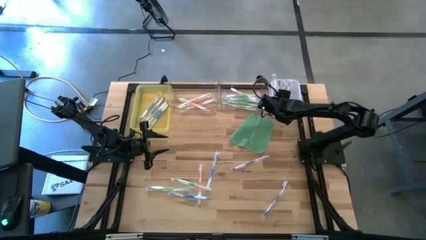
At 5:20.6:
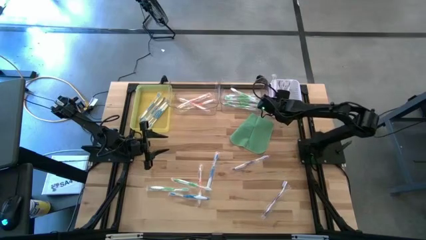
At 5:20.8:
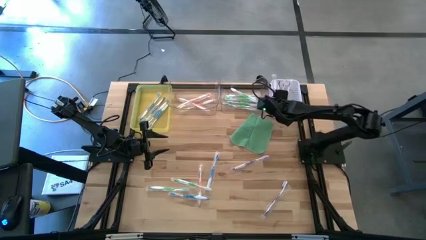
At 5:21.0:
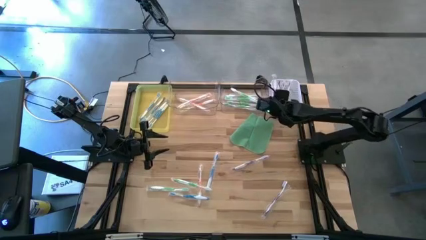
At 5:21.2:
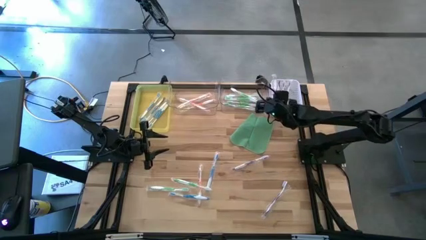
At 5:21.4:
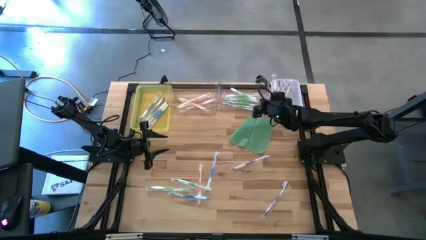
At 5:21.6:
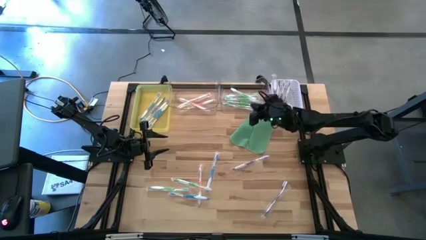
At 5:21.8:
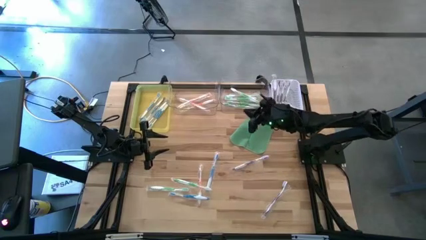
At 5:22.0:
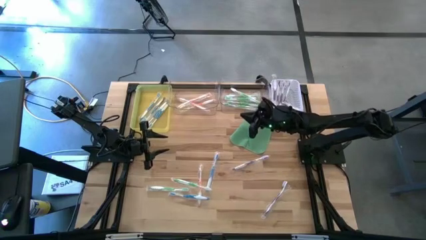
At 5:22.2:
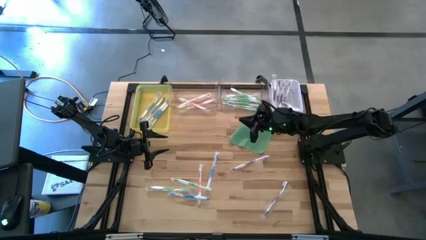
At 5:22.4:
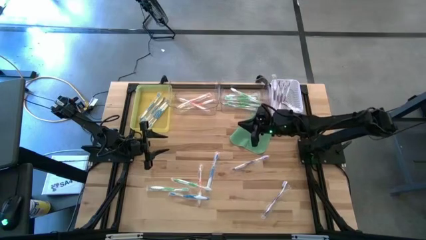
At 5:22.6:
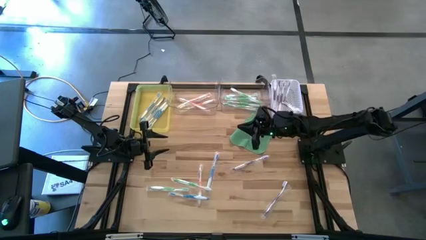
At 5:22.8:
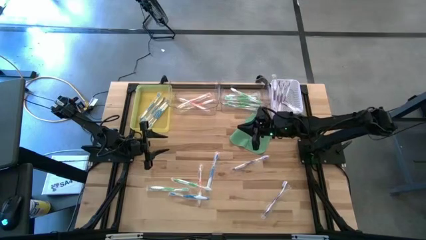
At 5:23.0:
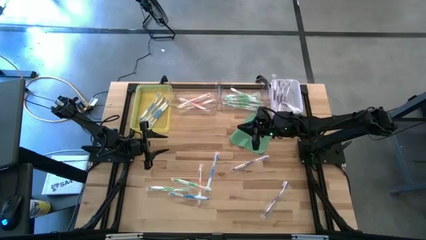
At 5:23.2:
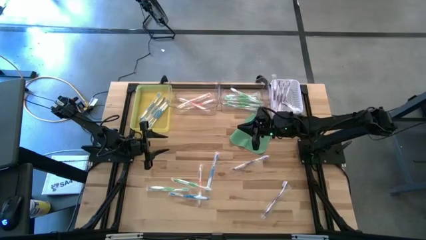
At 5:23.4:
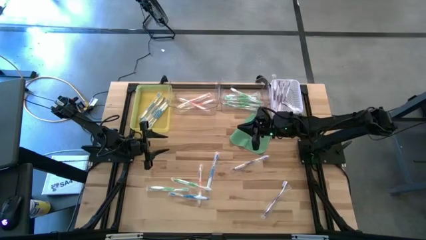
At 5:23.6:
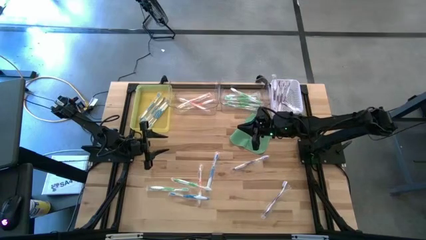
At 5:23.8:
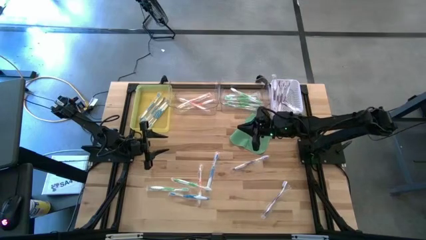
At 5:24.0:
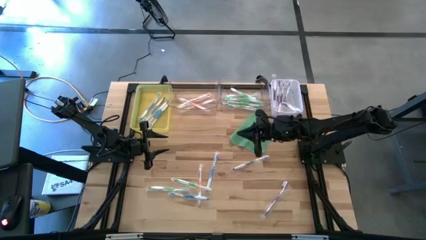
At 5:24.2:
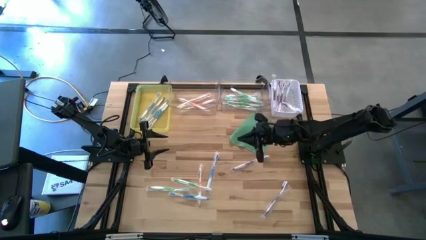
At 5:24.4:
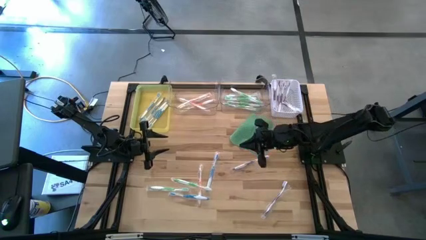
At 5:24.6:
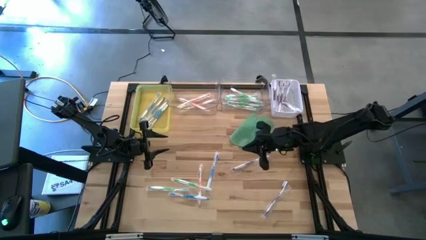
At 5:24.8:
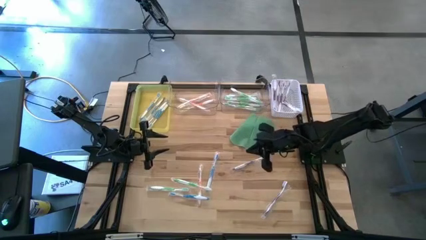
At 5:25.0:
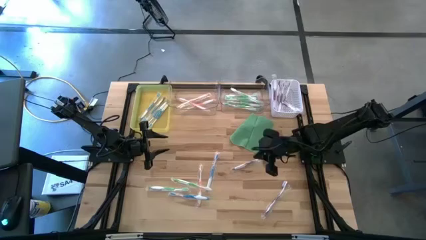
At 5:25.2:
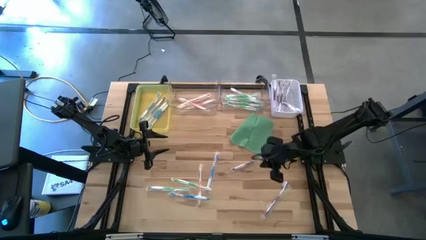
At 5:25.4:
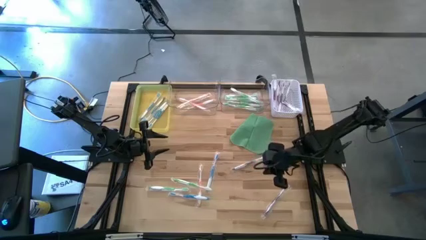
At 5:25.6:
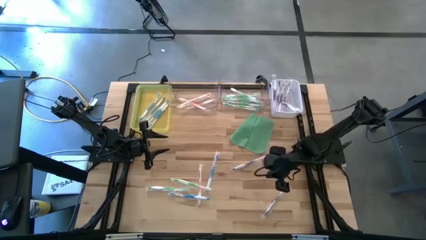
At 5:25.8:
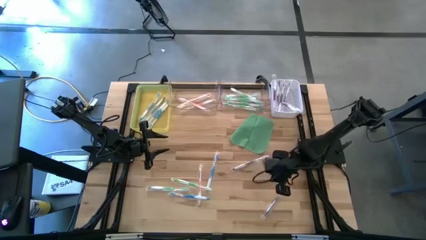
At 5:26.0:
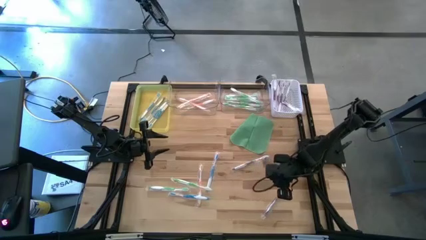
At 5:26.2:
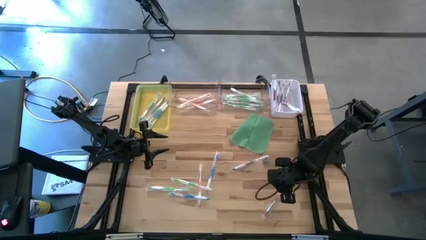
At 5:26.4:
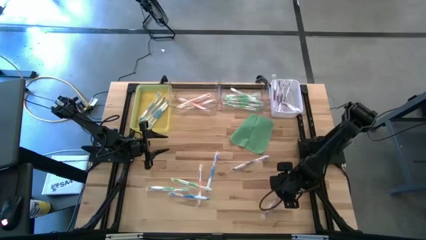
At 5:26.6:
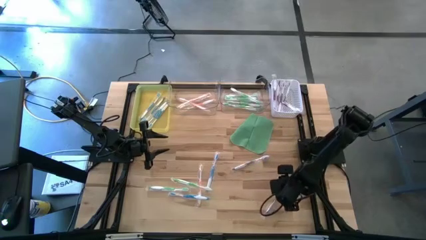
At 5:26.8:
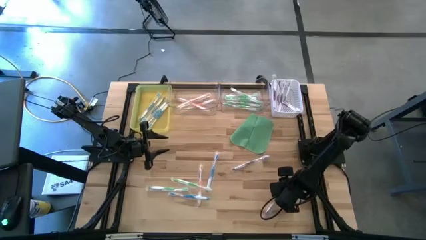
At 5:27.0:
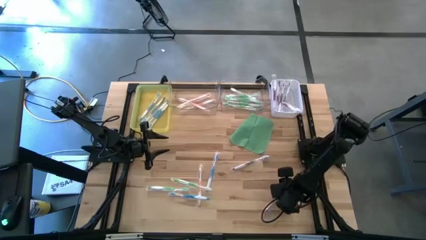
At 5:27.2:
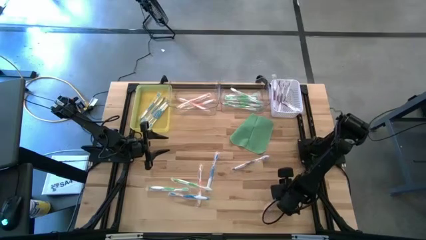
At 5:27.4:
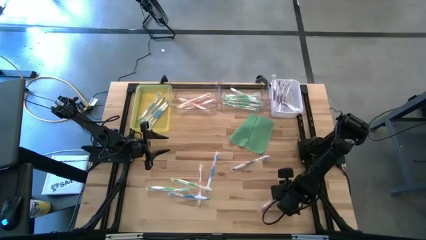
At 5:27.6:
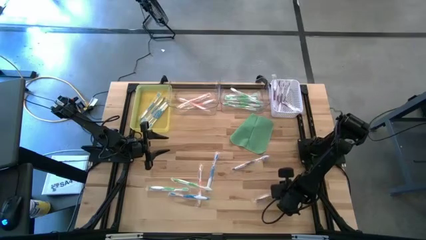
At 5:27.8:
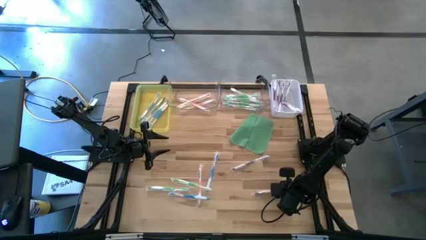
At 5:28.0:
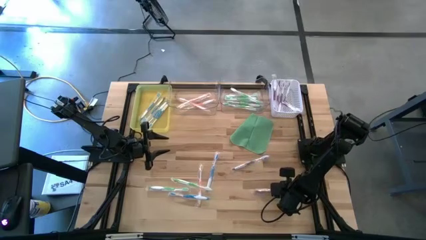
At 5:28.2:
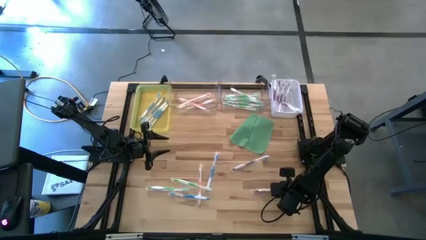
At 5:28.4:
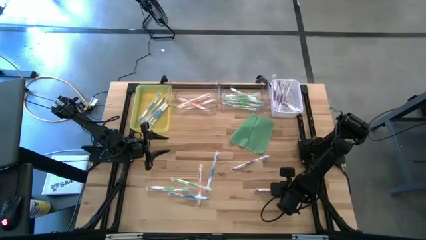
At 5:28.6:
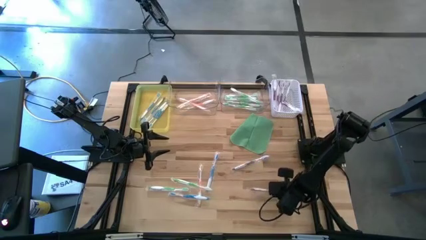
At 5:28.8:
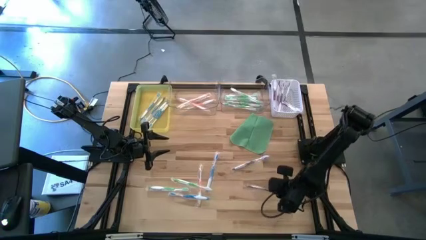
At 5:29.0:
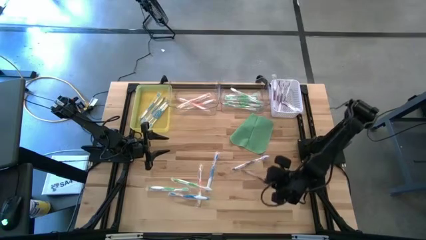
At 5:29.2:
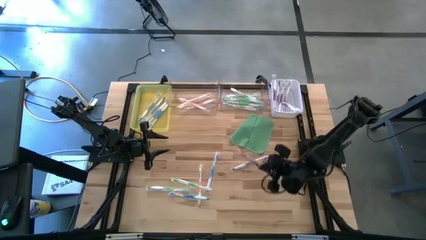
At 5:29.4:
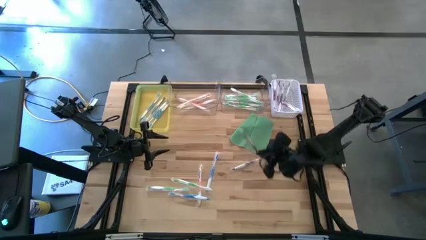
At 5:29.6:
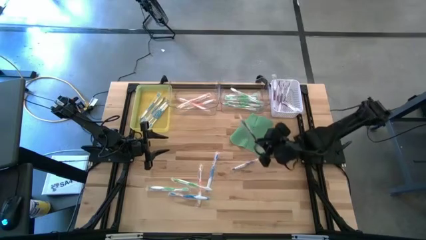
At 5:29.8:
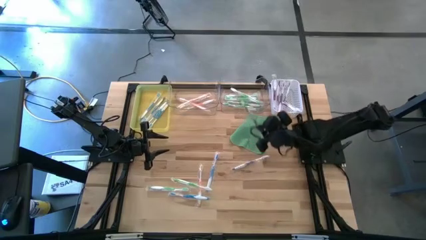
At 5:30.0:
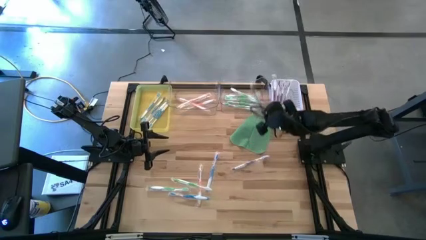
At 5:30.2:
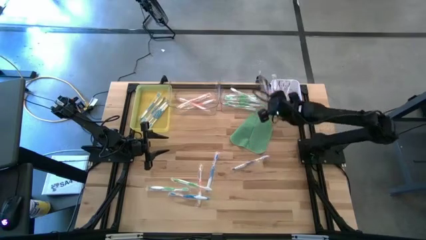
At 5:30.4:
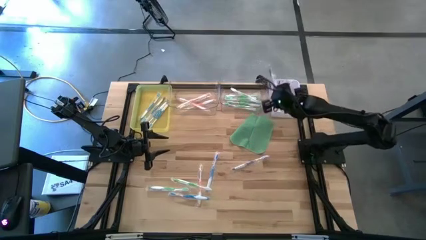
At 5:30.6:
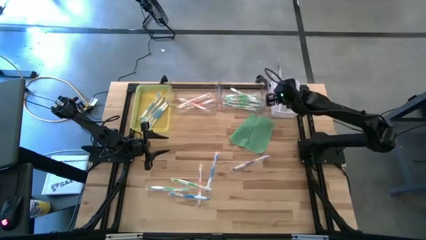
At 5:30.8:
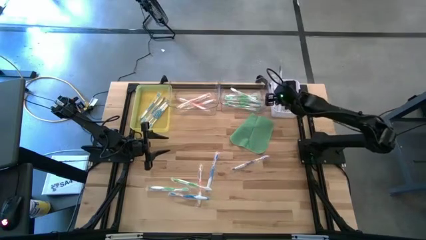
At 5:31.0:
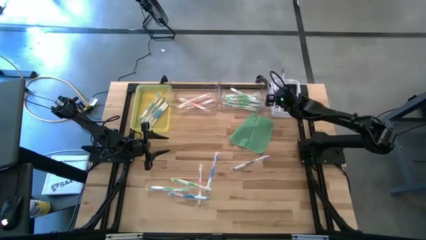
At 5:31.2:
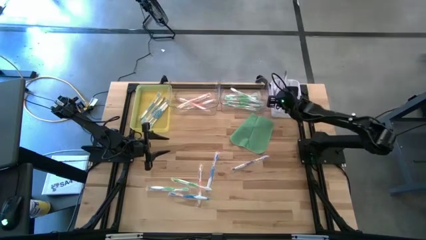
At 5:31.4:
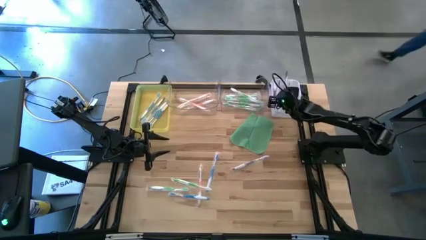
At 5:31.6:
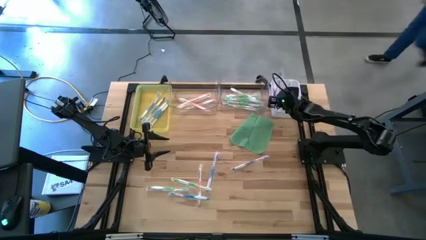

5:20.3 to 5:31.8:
Task: Pick & Place Toothbrushes
Put the purple toothbrush into the white bin

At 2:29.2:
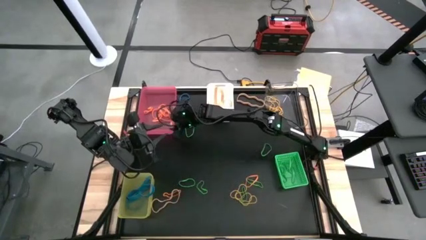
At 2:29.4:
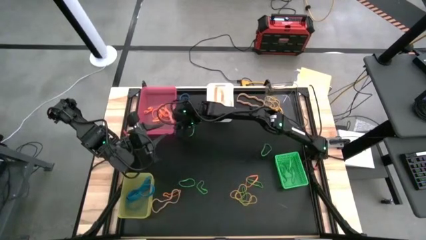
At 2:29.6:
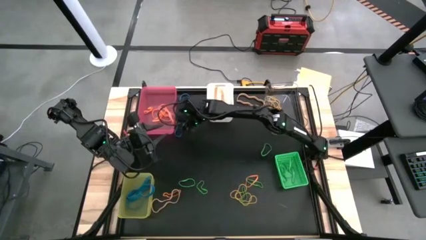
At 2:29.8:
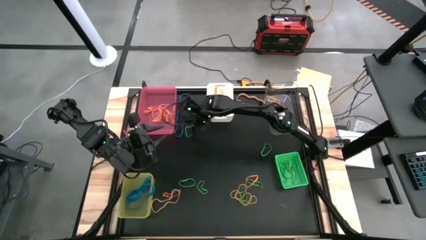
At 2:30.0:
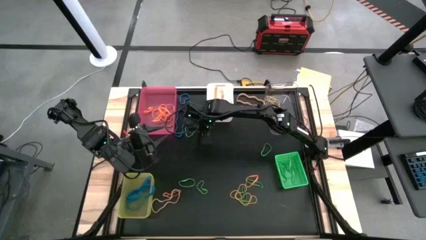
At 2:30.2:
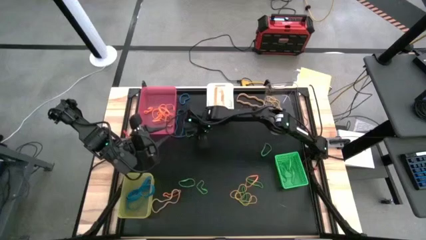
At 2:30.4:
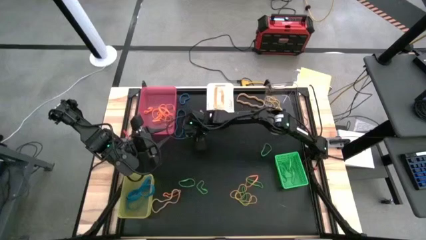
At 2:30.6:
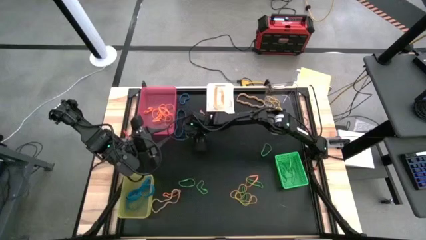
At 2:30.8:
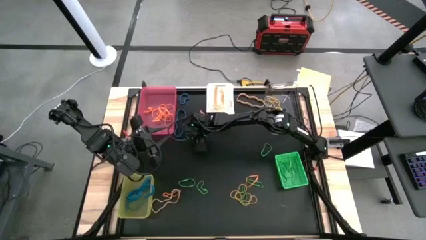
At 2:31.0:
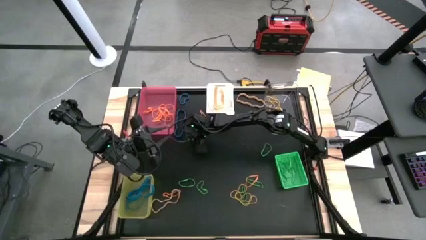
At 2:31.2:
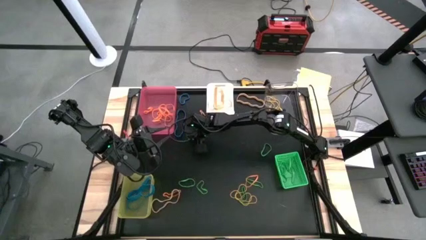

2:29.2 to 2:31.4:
Task: Sort rubber bands into baskets
Put the green rubber band into the green bin

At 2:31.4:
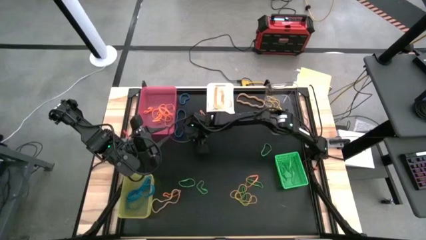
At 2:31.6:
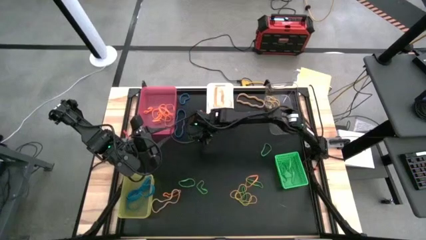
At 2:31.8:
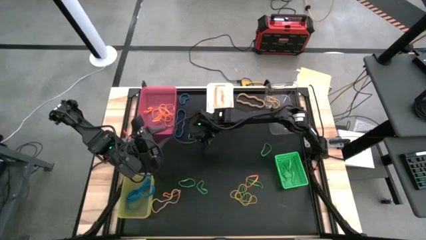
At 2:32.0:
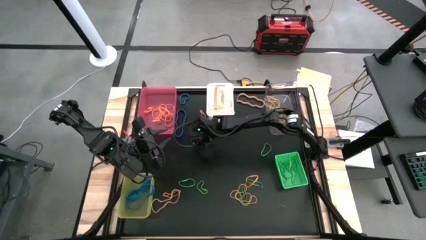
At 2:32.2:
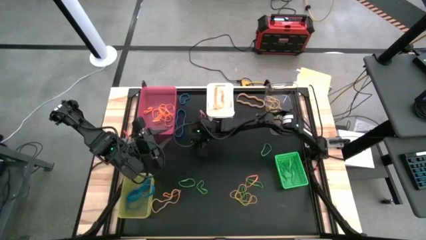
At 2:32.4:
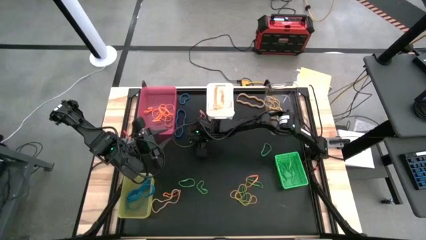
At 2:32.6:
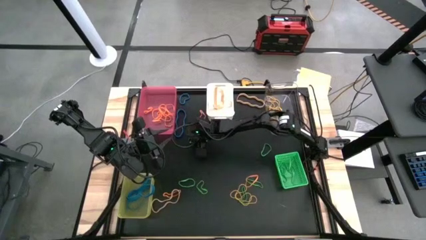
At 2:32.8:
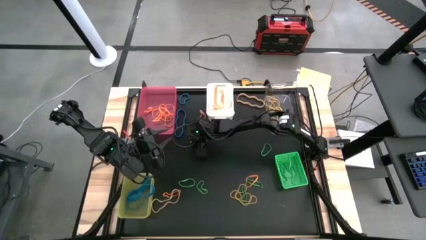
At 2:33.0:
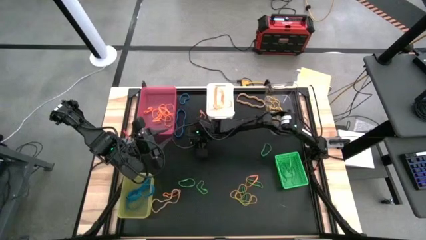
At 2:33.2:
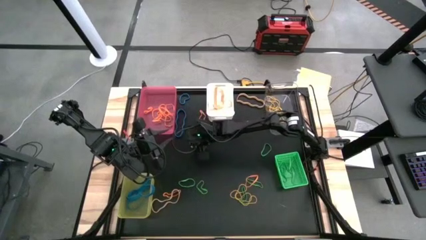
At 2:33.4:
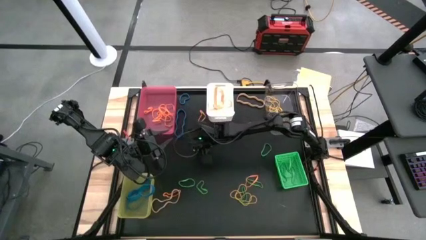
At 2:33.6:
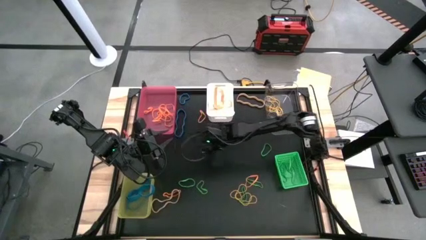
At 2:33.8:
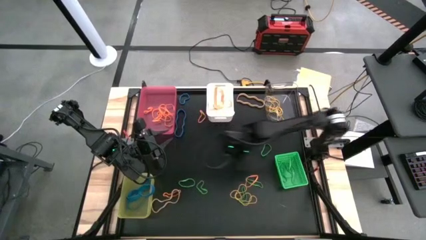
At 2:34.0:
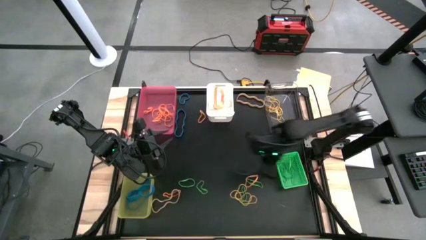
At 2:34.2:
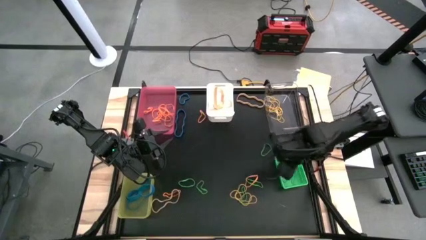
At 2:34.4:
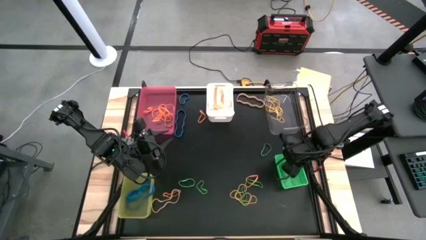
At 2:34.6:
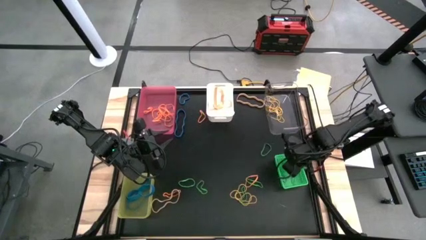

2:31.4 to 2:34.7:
Put the green rubber band into the green bin
